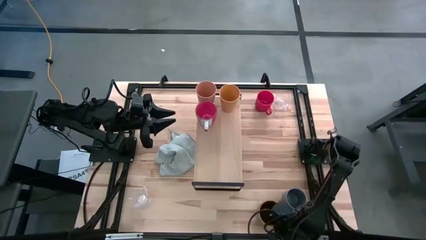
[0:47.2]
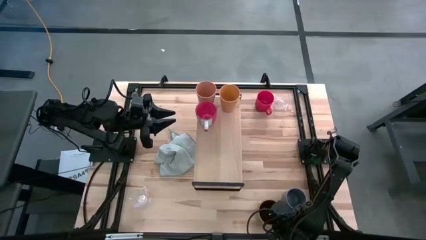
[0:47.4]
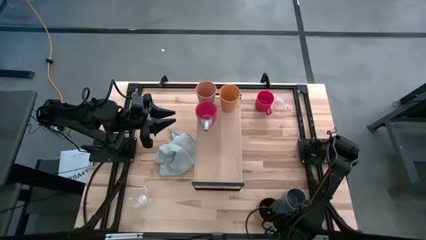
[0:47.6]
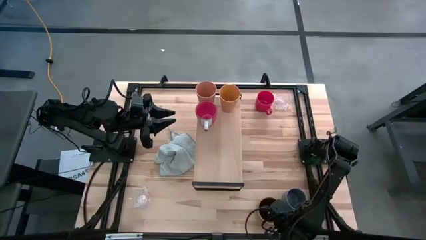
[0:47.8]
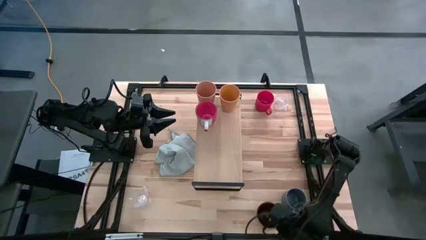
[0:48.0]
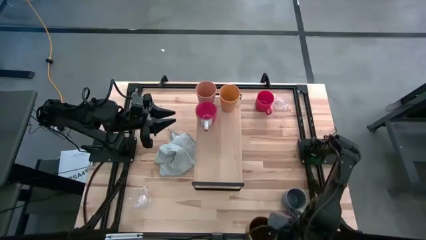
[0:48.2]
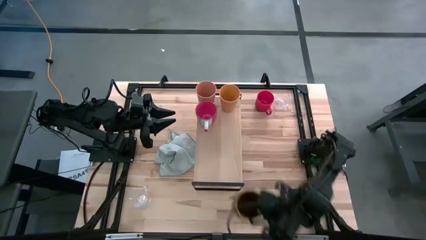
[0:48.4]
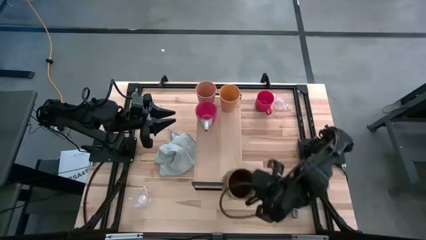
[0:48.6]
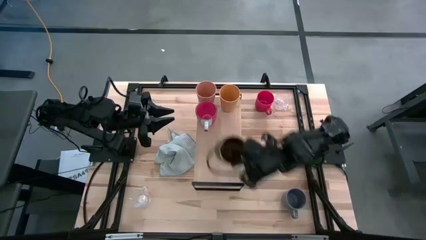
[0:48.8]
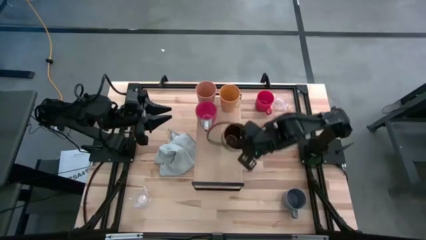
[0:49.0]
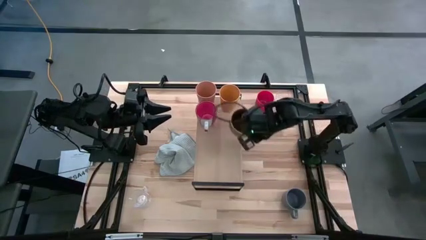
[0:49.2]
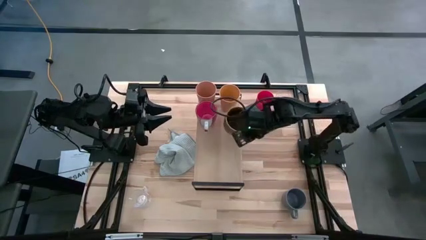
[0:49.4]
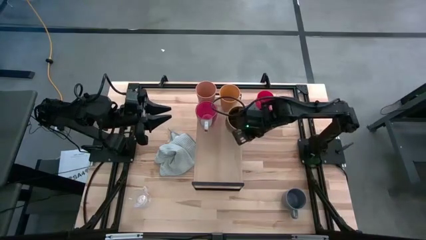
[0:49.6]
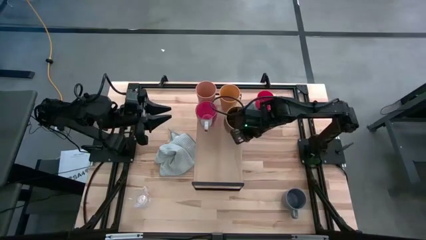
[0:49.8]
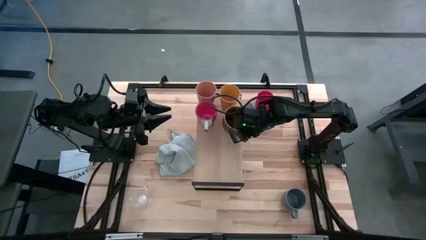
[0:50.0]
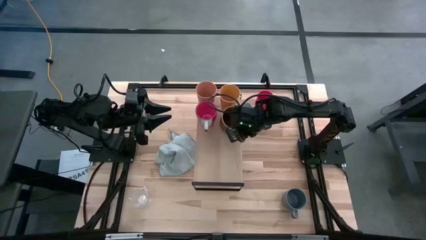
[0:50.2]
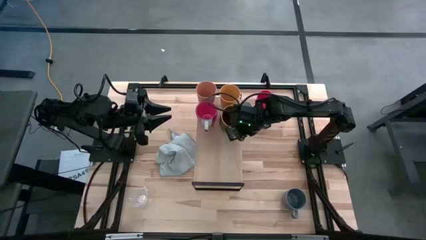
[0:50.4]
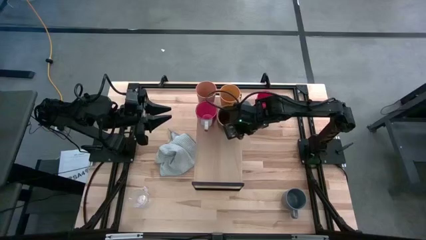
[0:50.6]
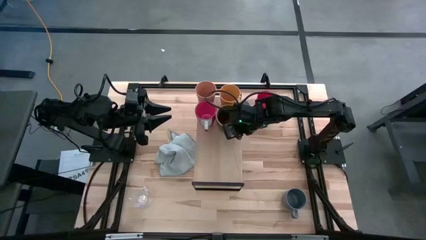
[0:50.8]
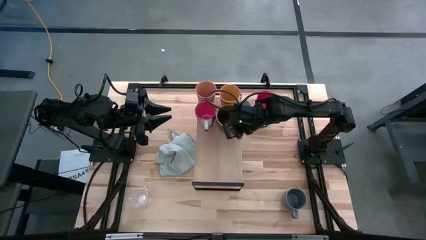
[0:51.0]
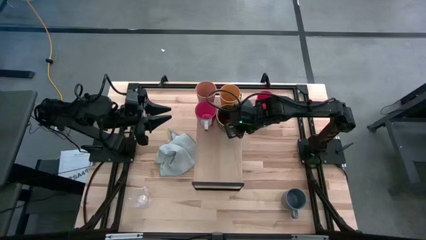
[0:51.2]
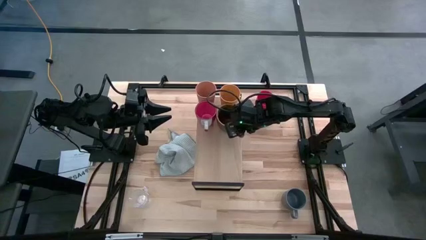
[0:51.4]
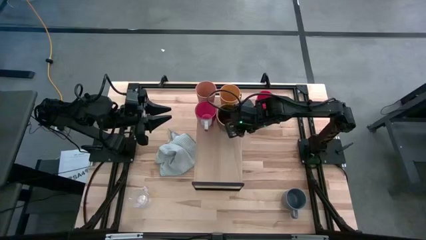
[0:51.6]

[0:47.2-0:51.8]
Task: Stack small to large cups/mugs on shelf
Put the brown mug on the shelf

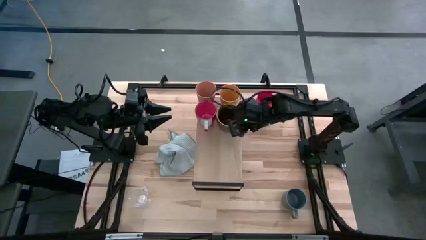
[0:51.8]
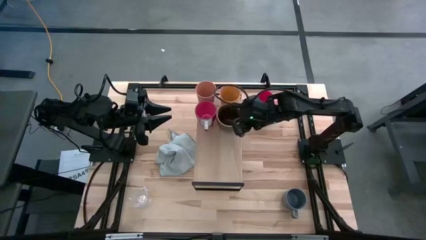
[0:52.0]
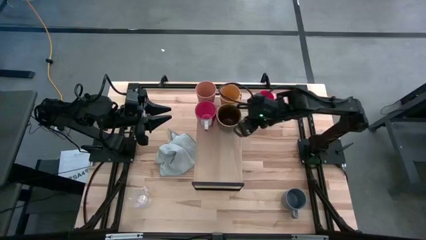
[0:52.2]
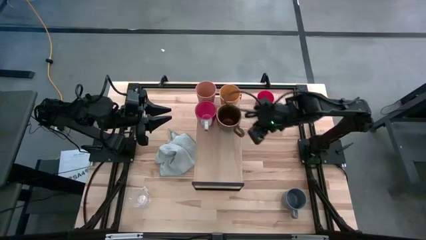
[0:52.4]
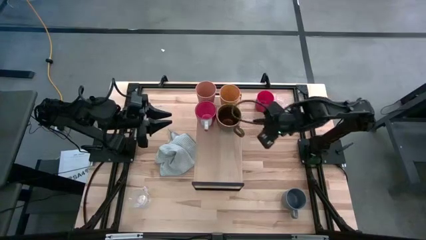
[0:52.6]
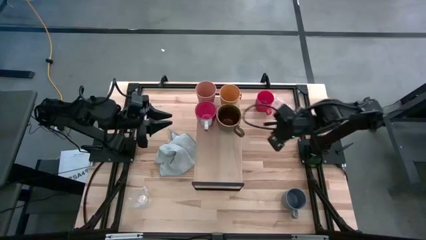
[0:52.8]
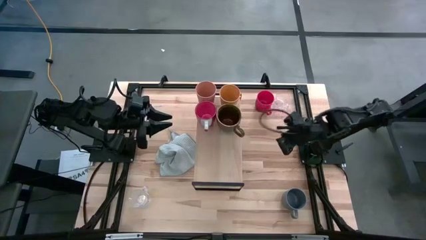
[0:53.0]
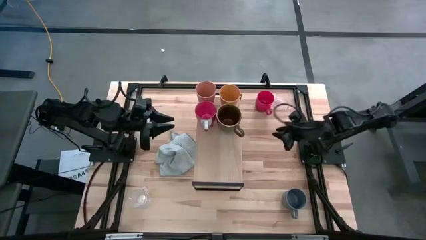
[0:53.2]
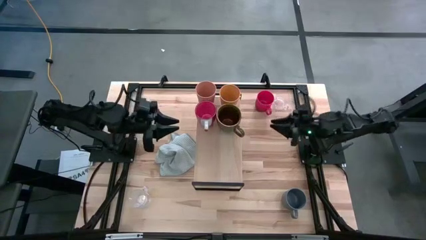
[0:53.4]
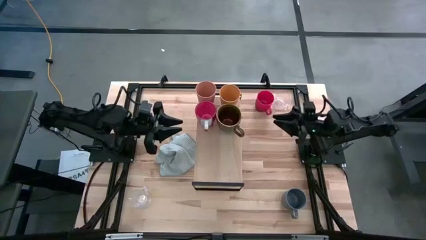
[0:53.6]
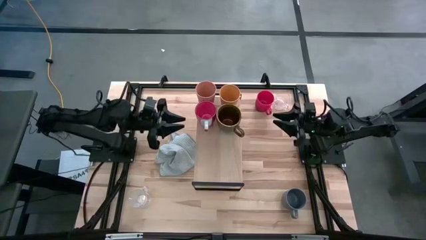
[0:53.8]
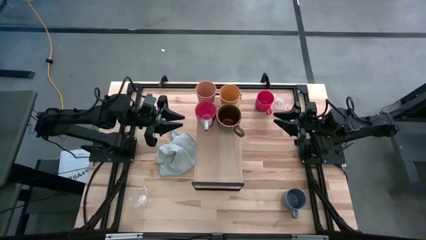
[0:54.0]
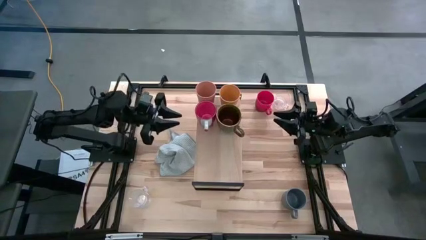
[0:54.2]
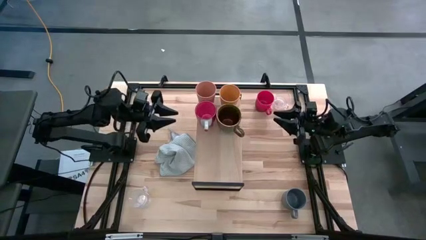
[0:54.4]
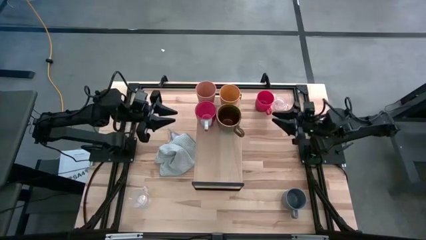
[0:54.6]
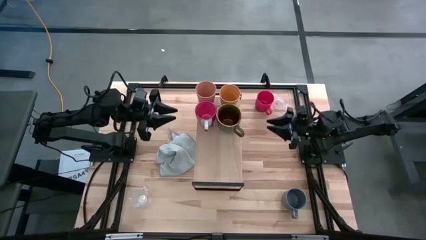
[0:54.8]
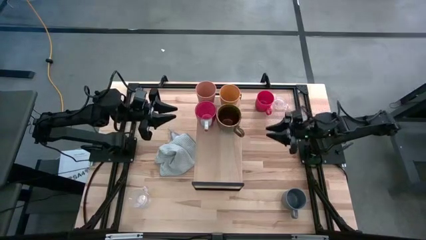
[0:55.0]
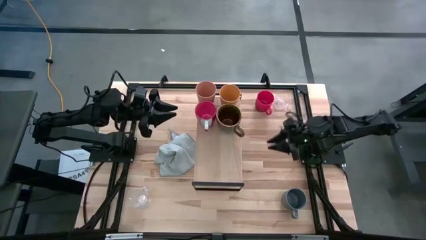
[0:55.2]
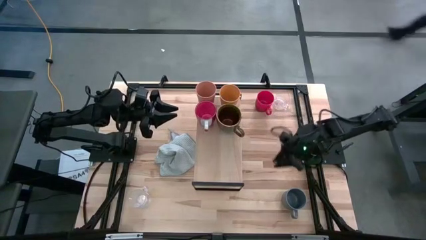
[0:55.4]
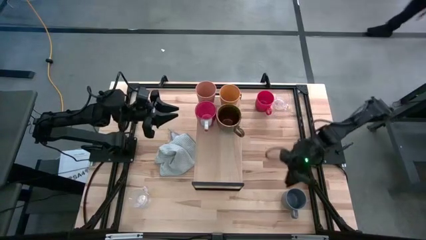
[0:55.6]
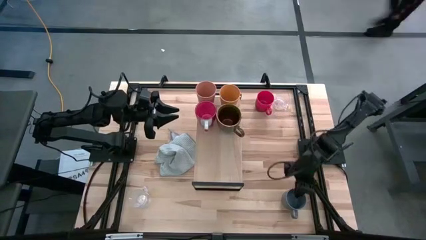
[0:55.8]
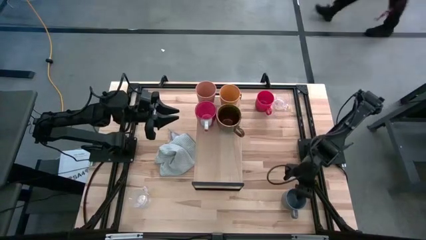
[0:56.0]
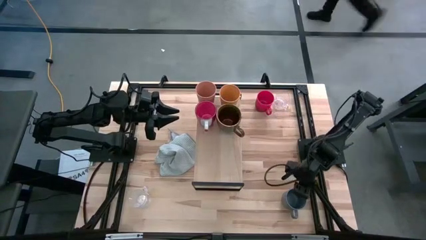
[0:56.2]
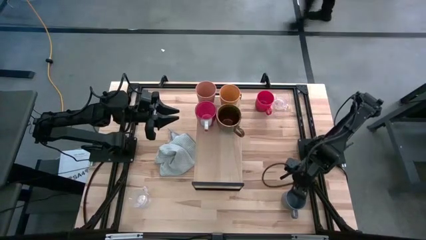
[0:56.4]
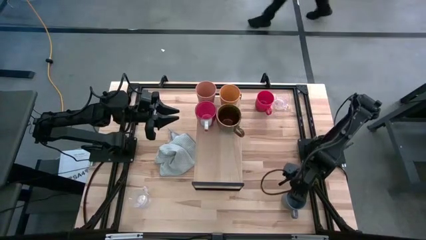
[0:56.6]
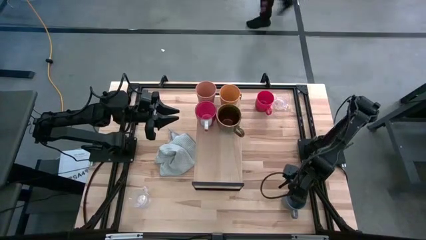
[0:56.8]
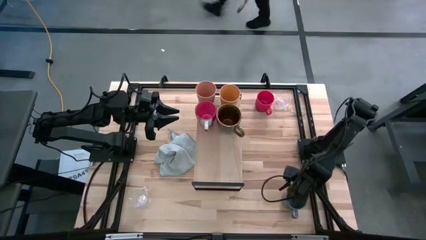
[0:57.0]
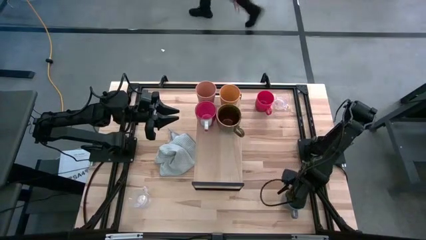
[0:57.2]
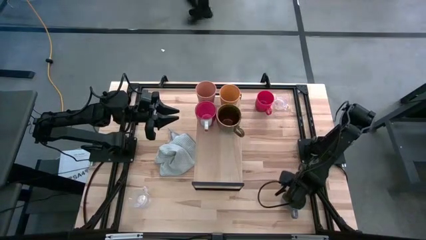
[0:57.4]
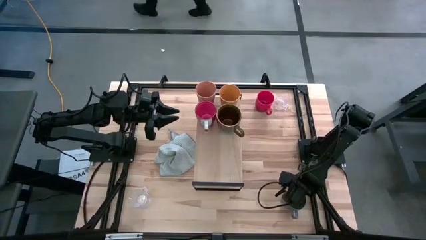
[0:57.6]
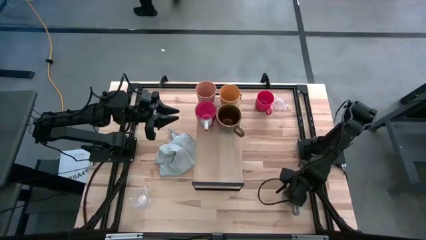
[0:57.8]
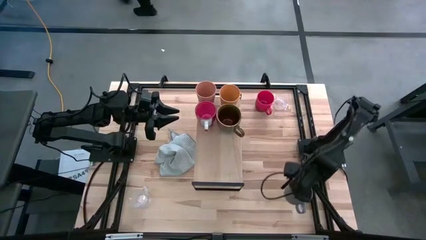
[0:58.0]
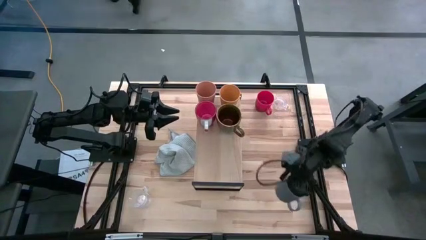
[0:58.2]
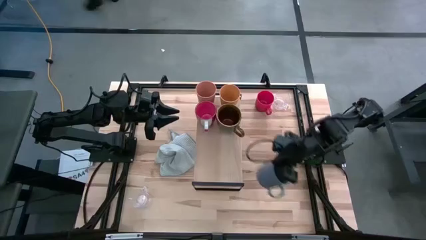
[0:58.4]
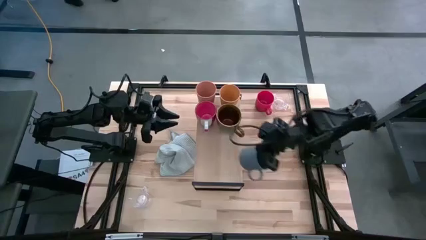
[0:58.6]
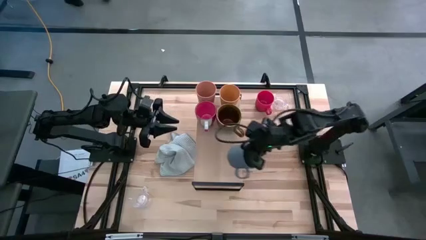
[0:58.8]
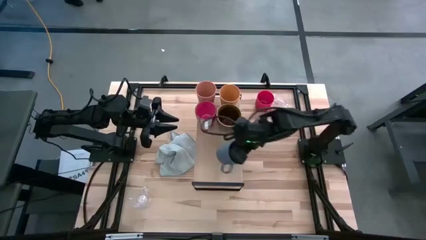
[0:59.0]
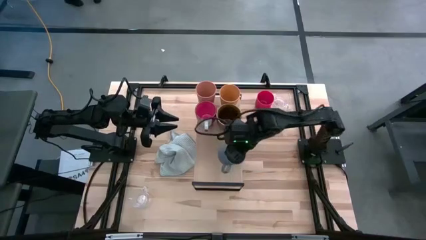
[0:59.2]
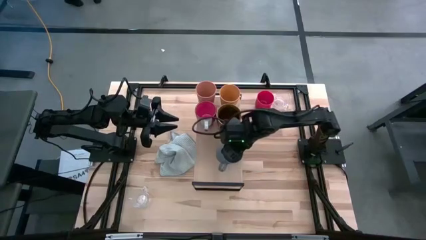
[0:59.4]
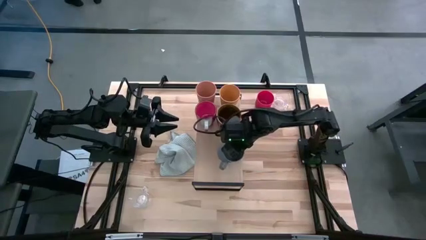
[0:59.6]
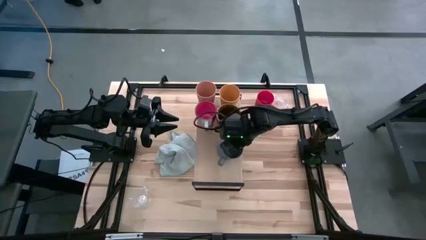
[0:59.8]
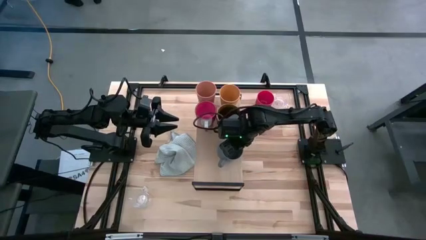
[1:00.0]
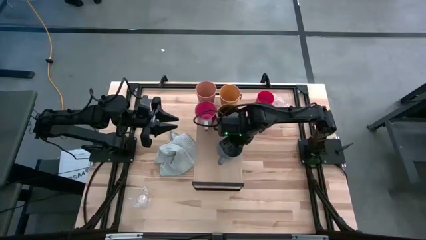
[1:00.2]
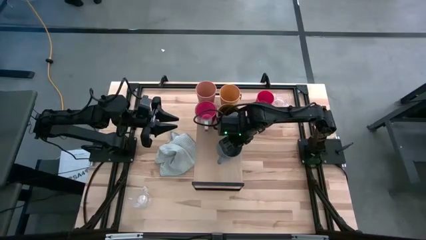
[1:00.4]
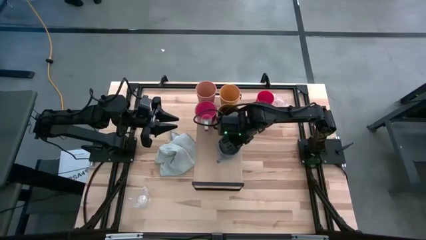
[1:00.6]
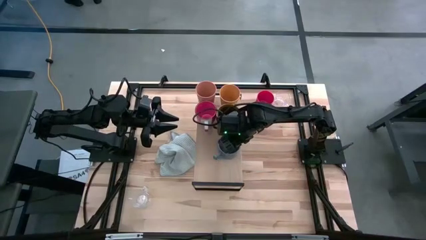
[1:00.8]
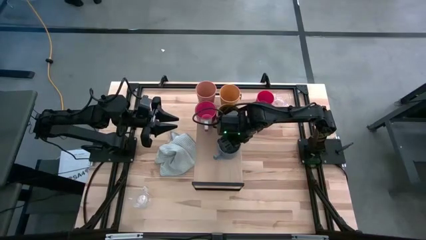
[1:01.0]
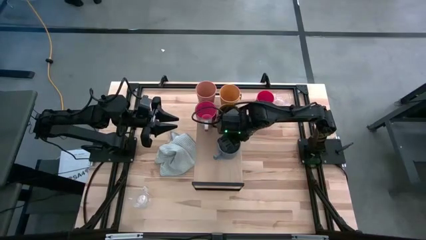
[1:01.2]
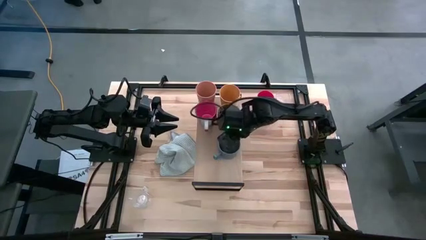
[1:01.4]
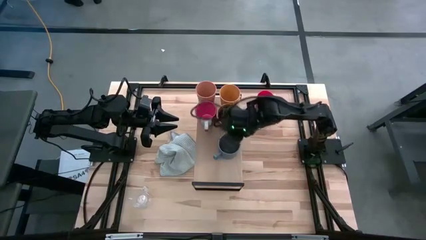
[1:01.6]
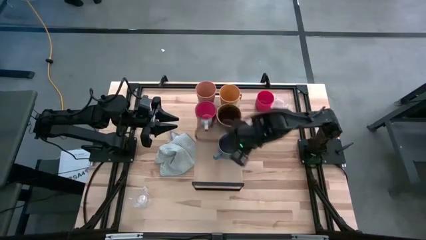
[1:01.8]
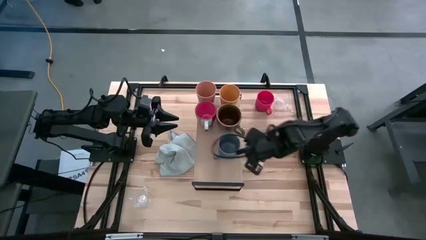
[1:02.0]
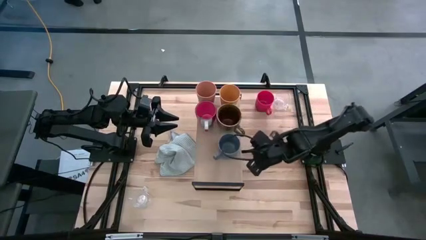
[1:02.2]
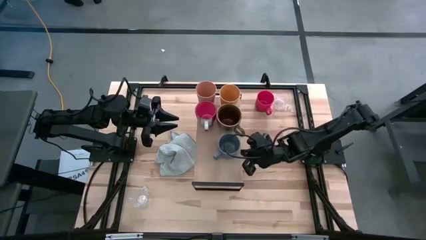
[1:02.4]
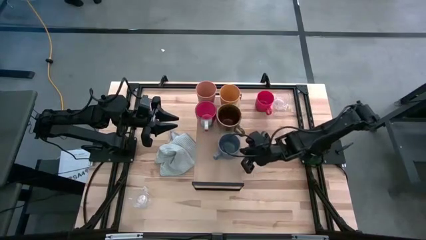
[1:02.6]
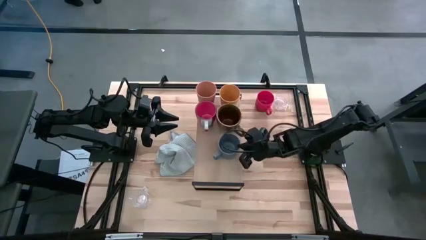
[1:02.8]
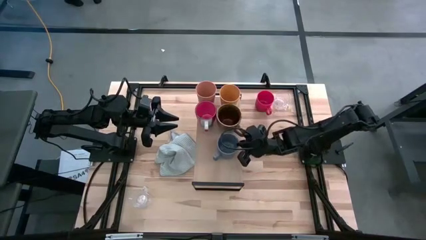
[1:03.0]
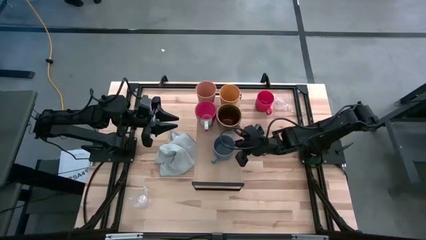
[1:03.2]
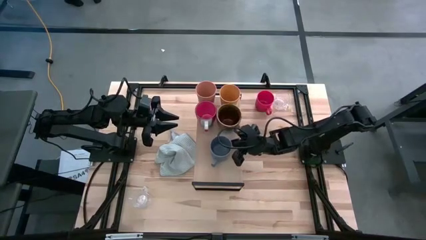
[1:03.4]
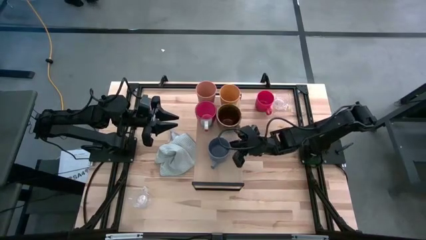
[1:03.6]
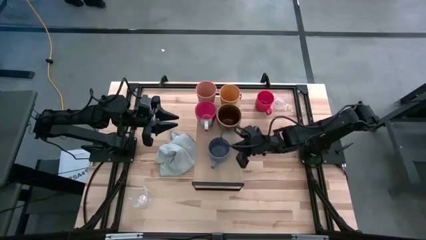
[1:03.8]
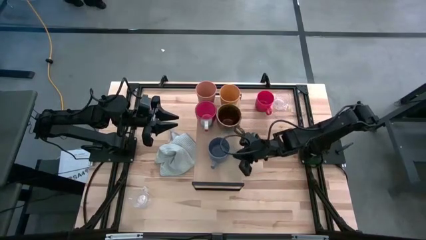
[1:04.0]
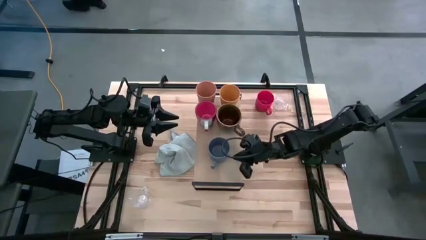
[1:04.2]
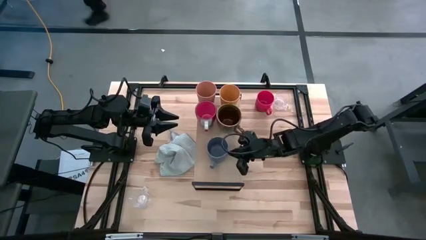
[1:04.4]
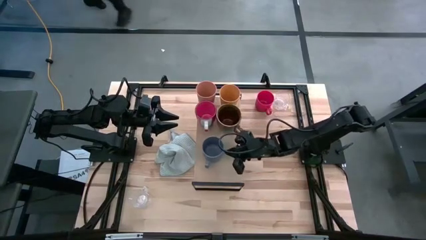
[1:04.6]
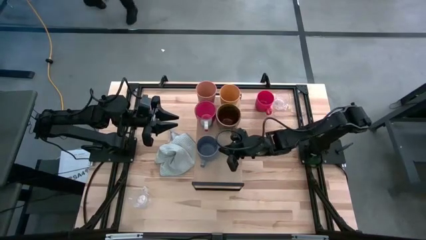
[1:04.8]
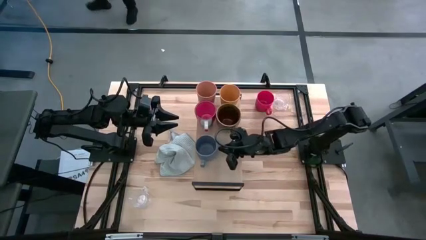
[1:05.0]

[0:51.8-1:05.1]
Put the blue mug on the shelf
